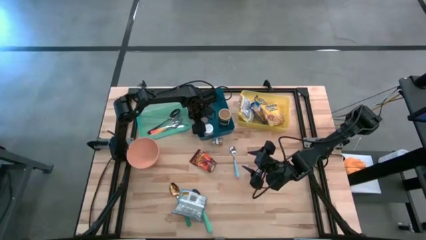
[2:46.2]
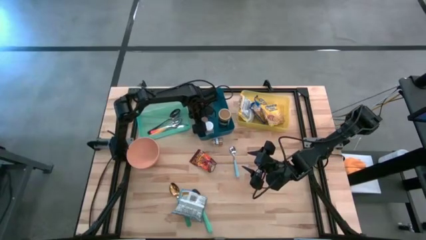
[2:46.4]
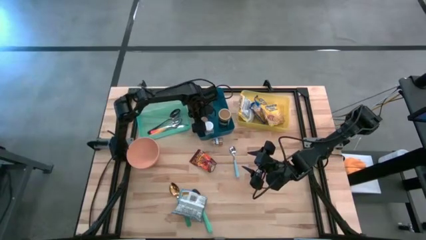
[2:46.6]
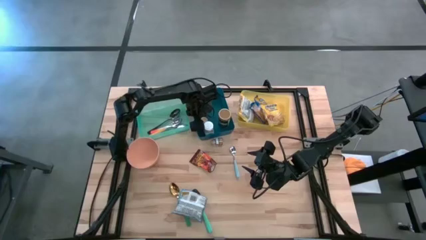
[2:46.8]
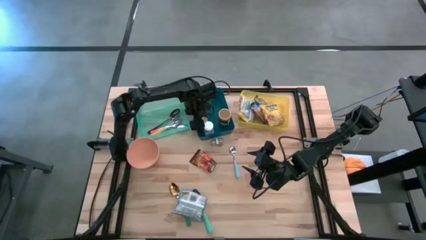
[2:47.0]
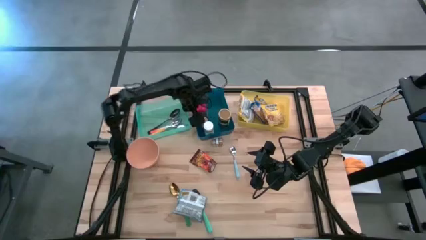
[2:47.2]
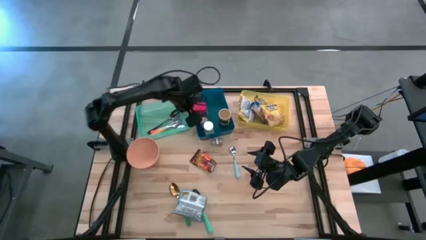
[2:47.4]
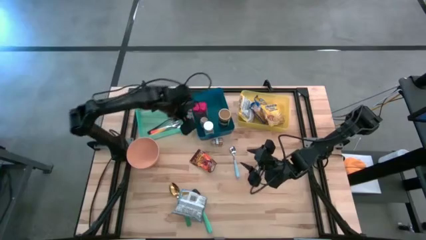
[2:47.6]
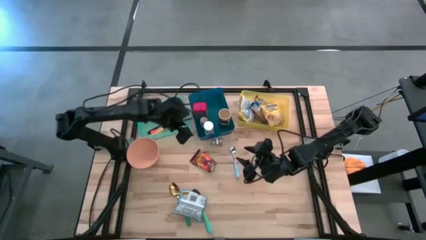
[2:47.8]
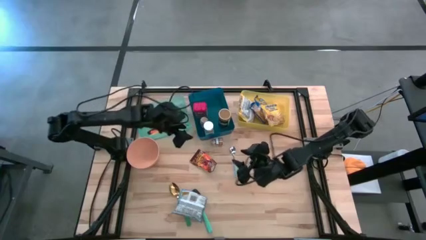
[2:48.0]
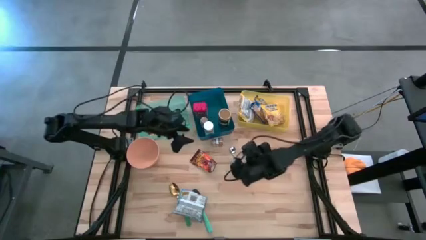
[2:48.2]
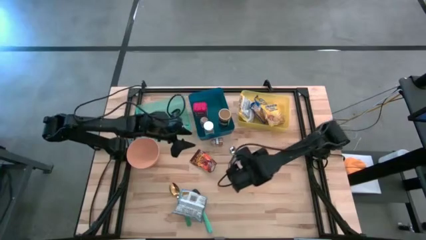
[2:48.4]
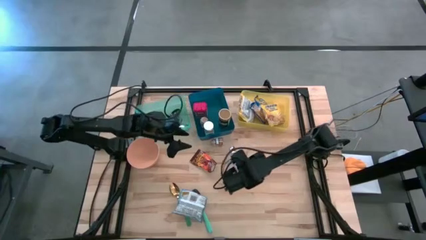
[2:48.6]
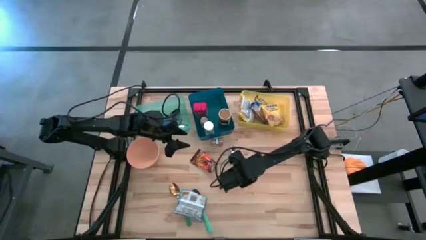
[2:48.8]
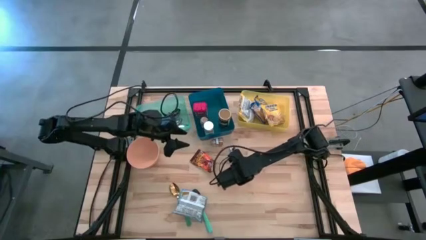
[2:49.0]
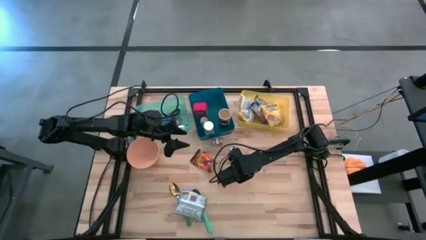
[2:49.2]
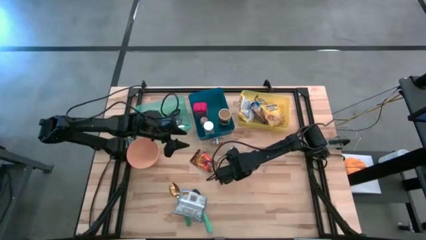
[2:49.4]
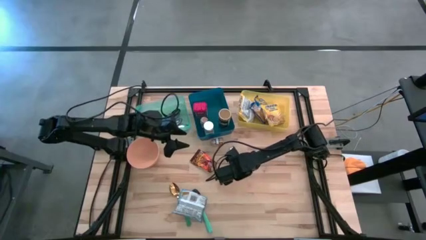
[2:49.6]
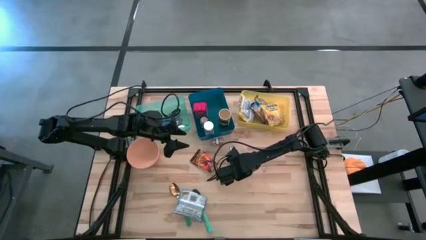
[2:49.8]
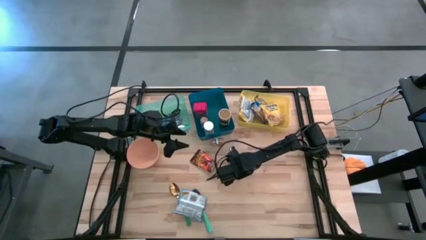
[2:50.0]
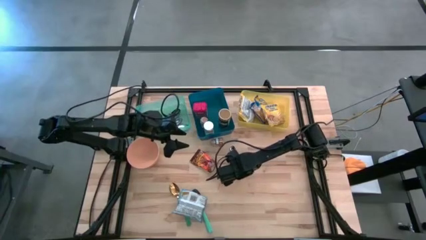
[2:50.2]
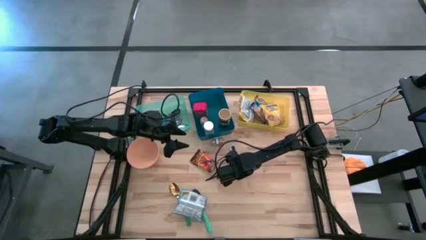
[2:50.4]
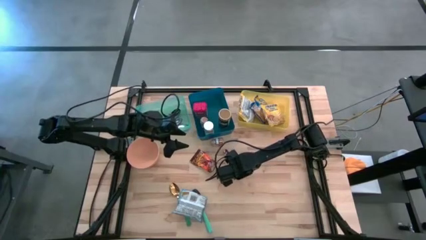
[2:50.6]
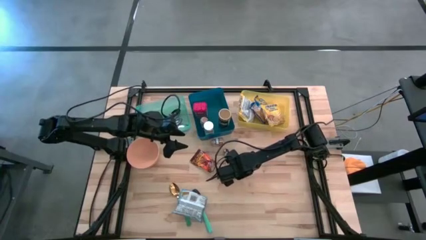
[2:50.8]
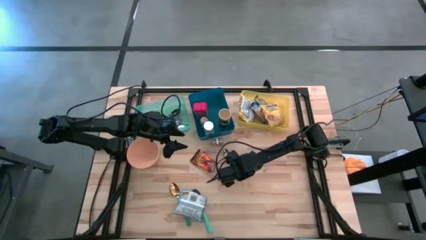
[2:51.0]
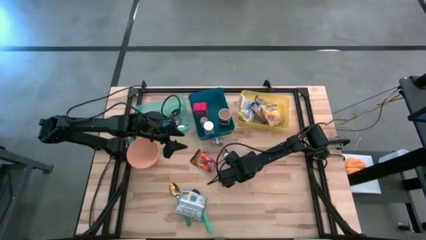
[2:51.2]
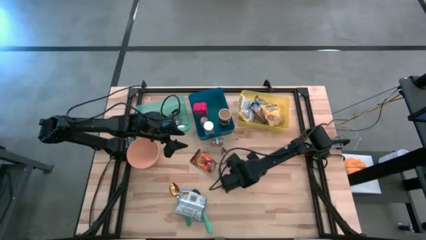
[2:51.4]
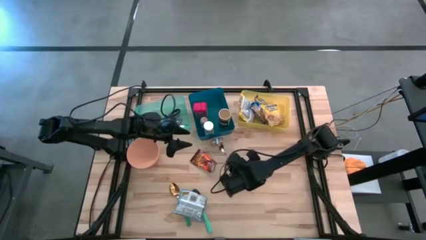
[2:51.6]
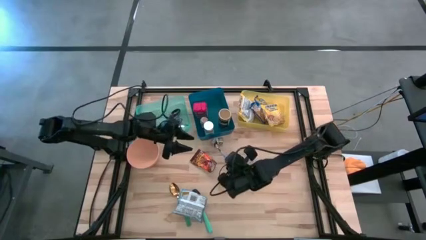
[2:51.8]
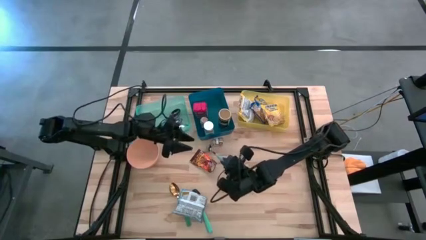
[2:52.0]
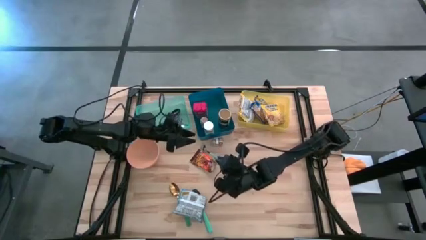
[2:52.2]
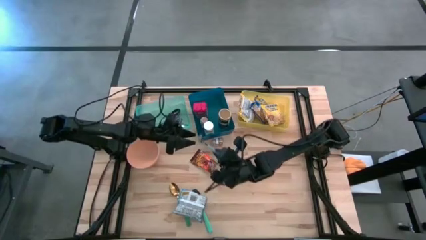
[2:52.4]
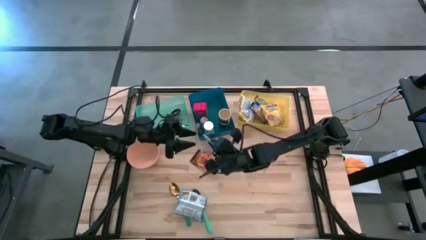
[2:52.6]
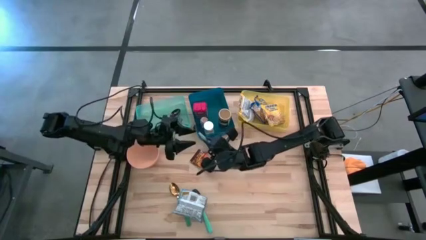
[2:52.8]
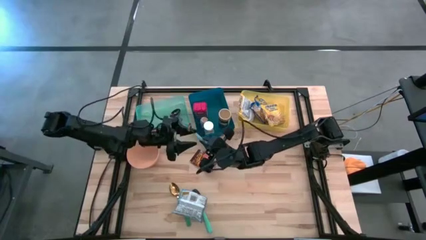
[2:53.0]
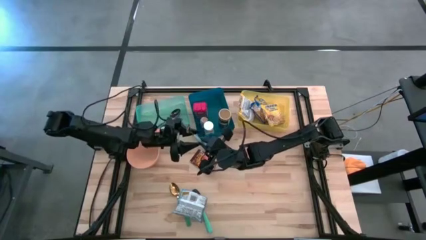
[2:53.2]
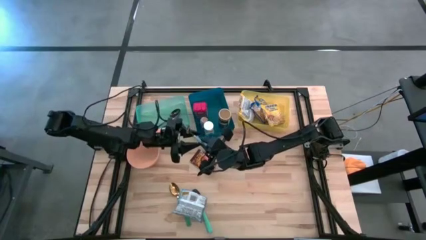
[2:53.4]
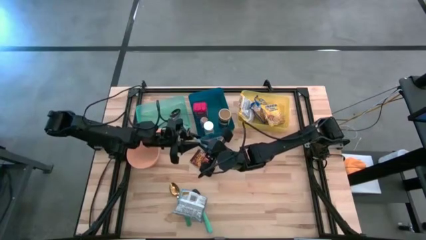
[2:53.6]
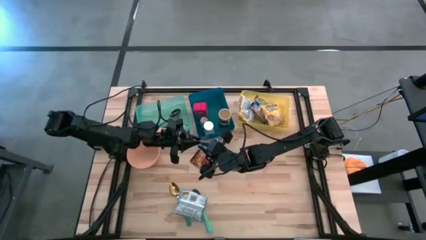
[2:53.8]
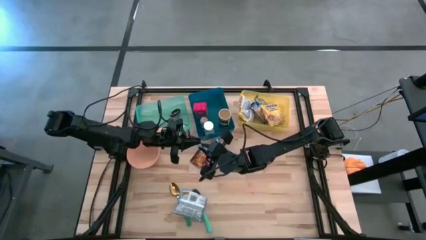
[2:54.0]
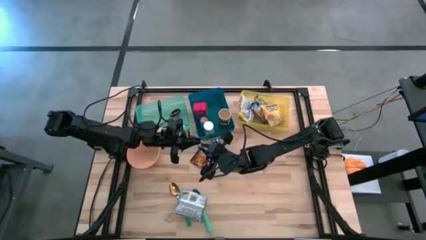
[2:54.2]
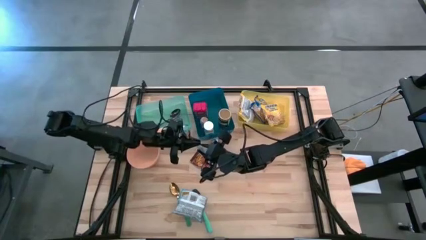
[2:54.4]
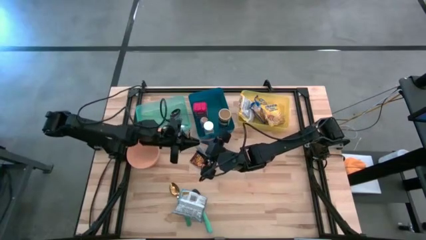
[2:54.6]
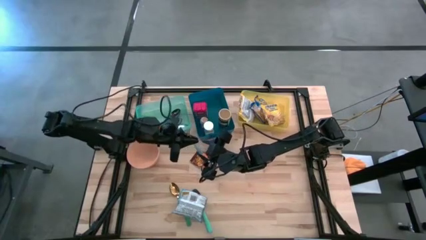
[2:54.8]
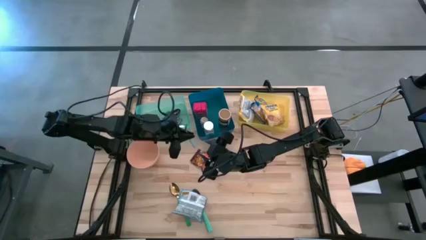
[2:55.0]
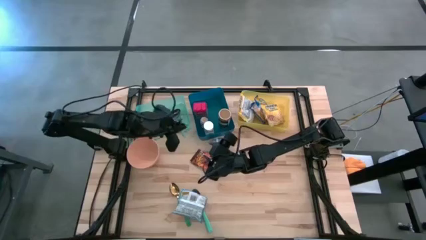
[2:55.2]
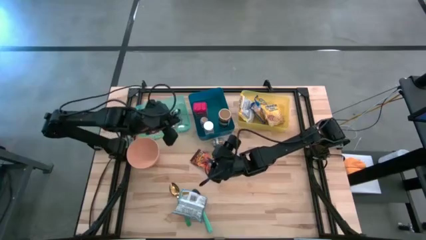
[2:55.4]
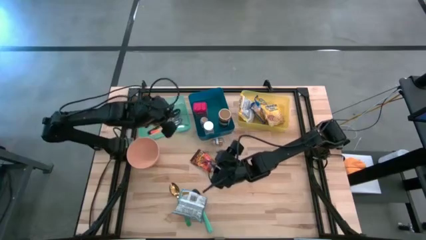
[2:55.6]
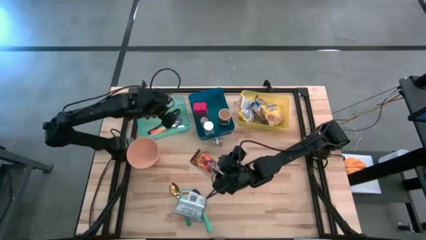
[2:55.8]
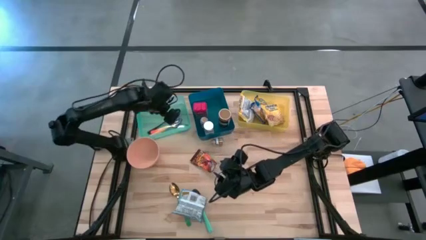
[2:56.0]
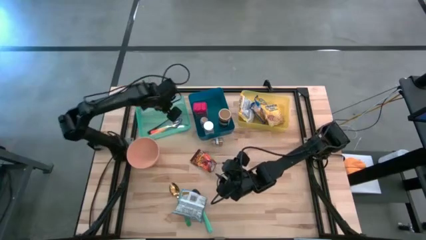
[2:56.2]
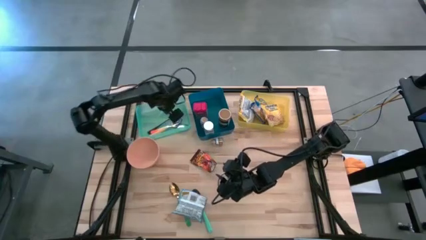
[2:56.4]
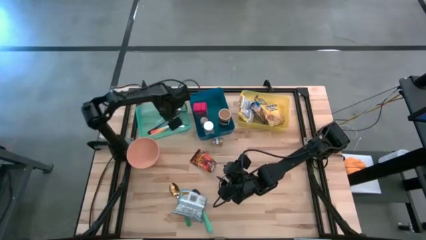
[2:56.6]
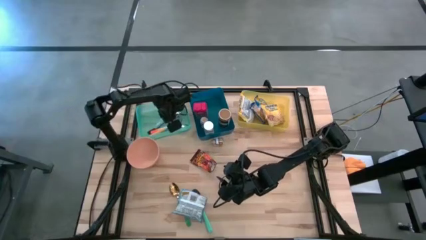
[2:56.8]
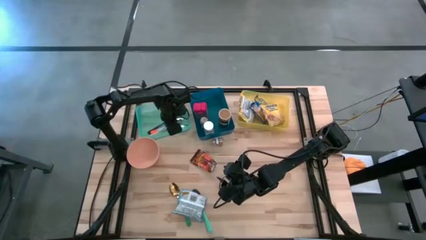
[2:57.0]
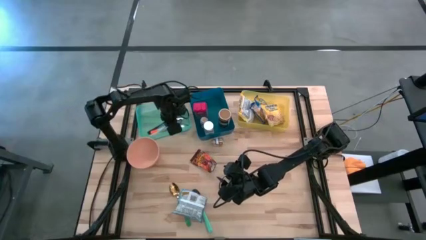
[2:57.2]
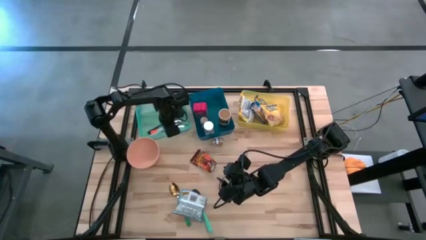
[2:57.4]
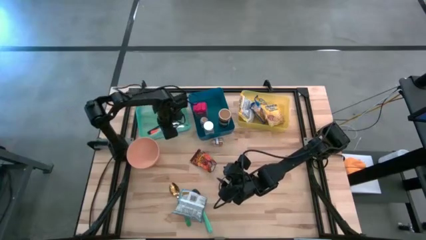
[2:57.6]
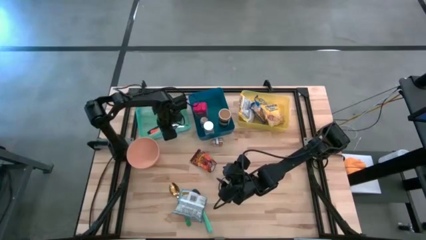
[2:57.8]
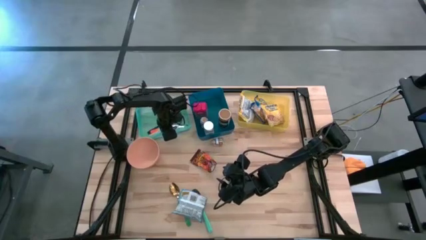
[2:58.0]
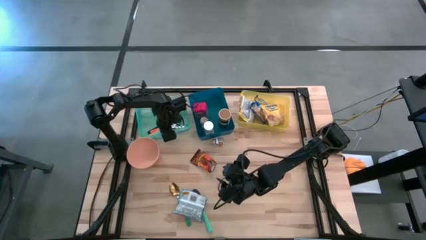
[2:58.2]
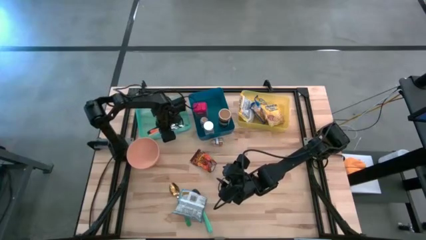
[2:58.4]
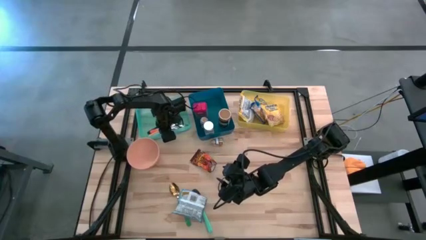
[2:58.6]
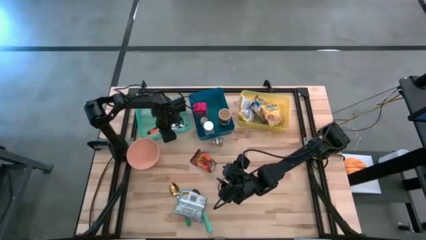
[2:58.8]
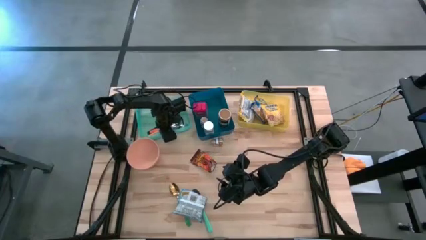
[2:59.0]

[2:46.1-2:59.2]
Put the light blue spoon into the green bin
